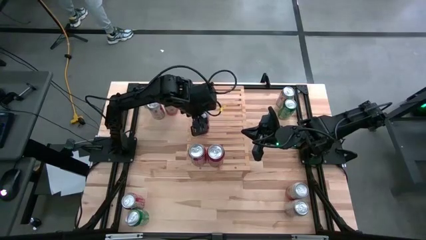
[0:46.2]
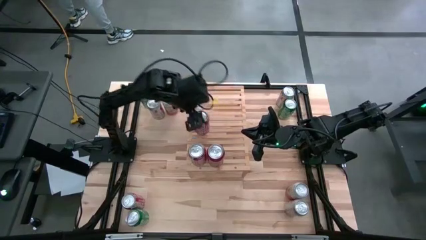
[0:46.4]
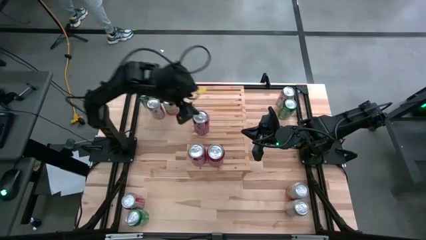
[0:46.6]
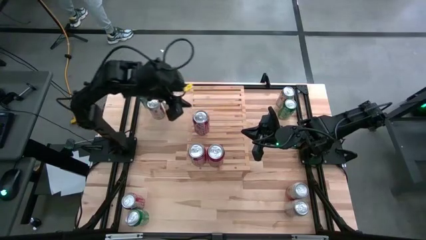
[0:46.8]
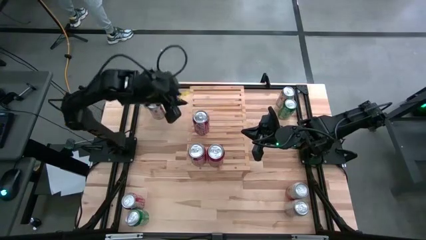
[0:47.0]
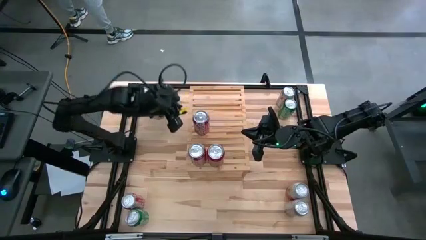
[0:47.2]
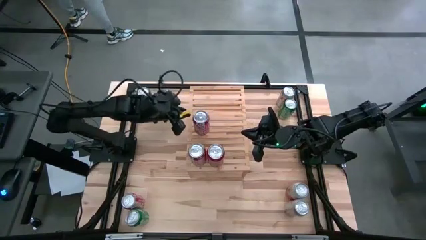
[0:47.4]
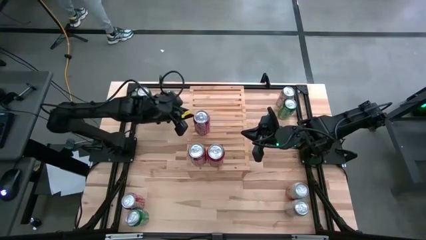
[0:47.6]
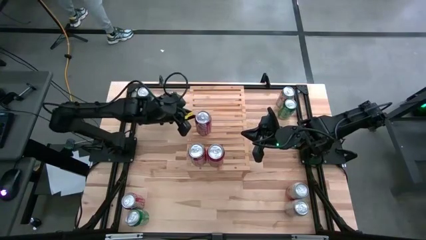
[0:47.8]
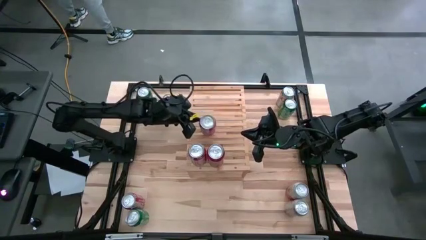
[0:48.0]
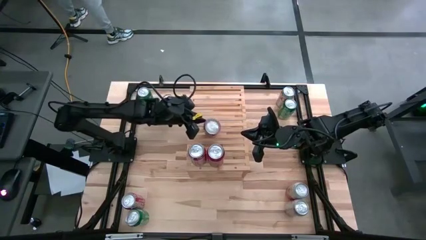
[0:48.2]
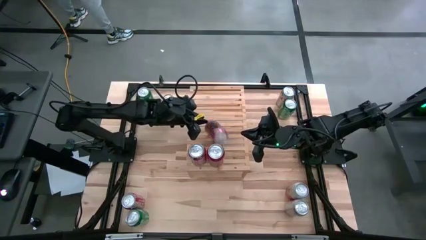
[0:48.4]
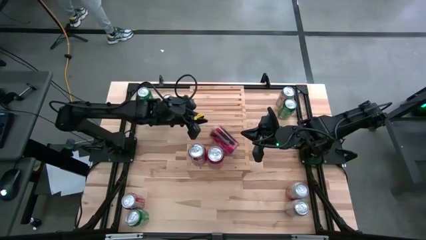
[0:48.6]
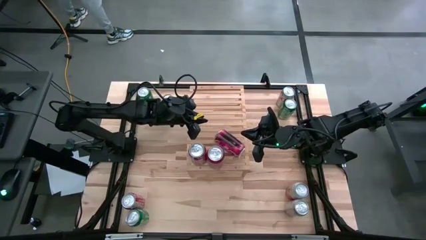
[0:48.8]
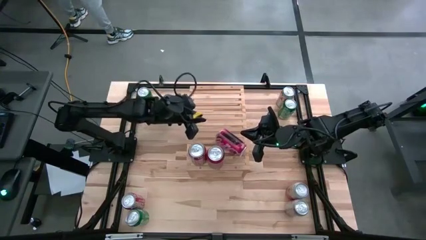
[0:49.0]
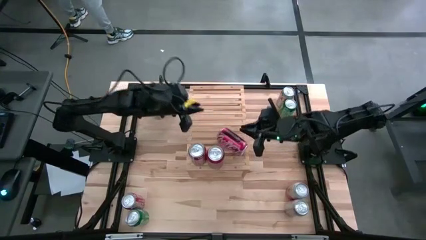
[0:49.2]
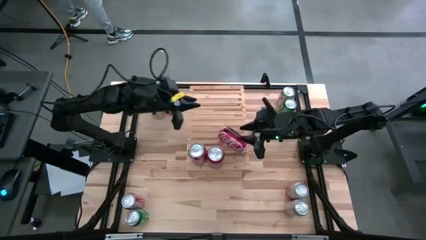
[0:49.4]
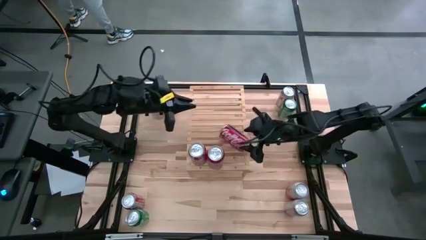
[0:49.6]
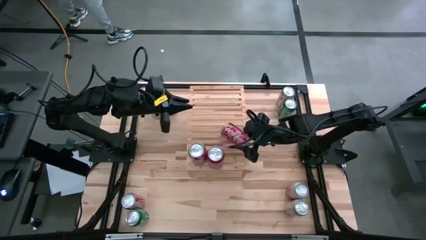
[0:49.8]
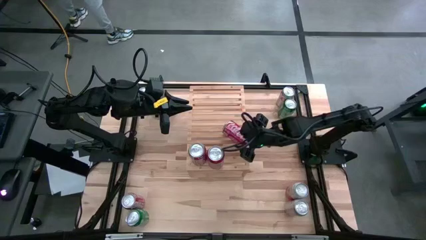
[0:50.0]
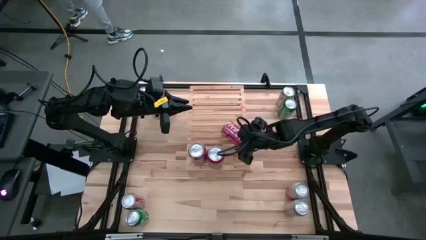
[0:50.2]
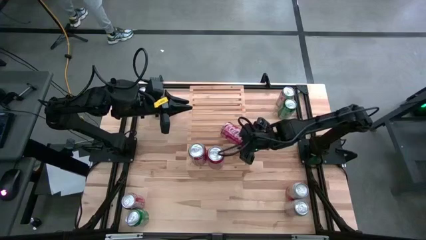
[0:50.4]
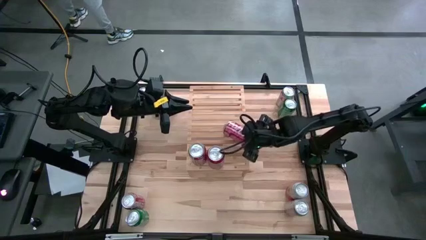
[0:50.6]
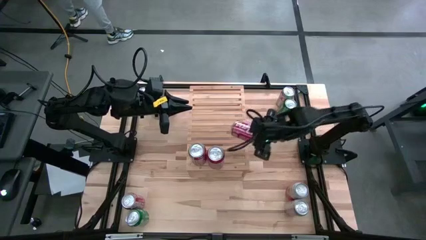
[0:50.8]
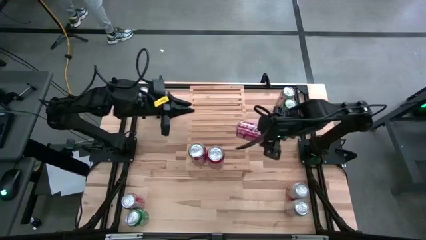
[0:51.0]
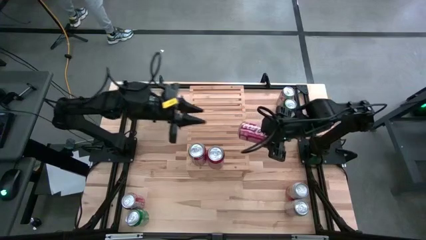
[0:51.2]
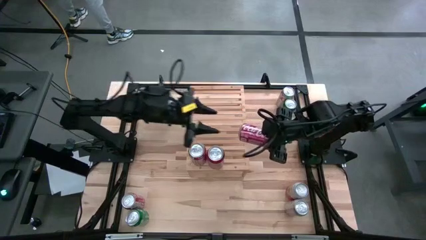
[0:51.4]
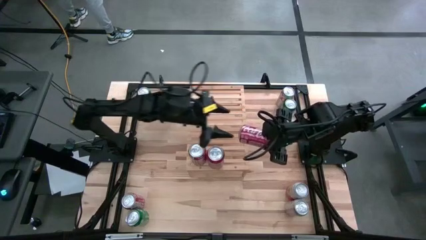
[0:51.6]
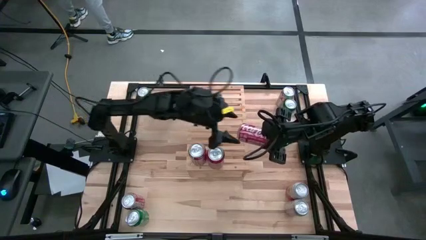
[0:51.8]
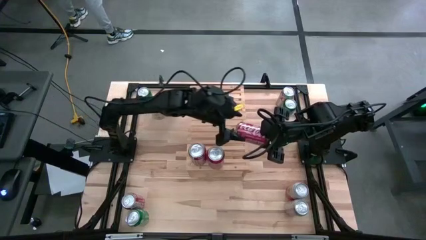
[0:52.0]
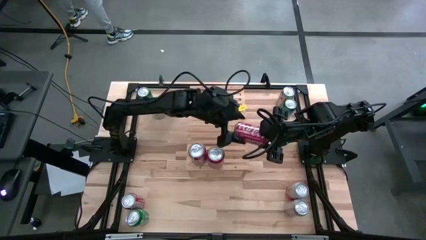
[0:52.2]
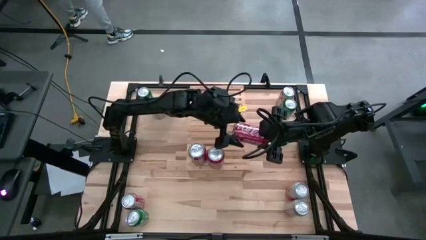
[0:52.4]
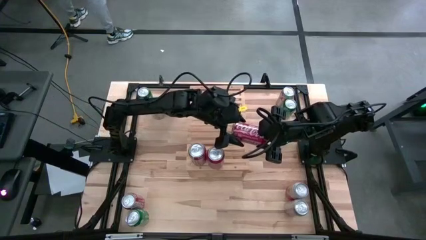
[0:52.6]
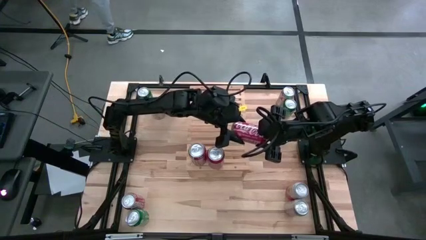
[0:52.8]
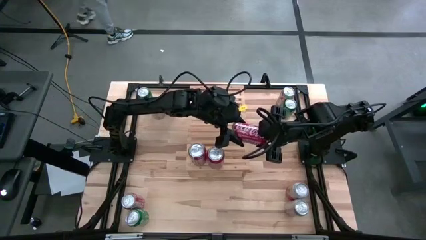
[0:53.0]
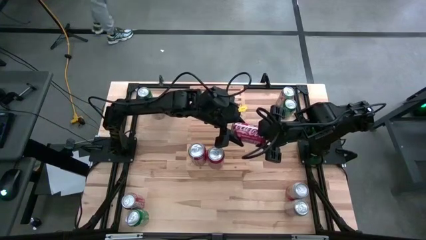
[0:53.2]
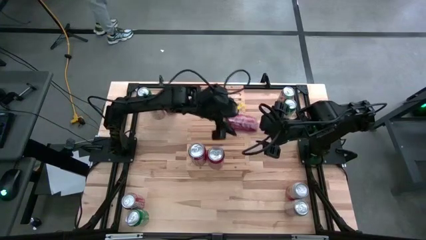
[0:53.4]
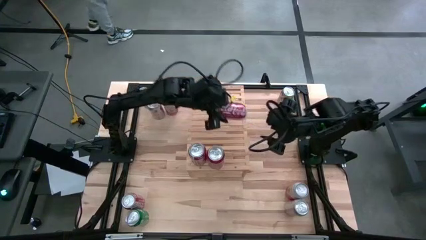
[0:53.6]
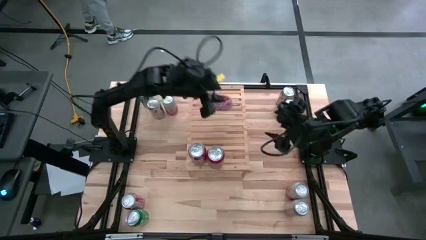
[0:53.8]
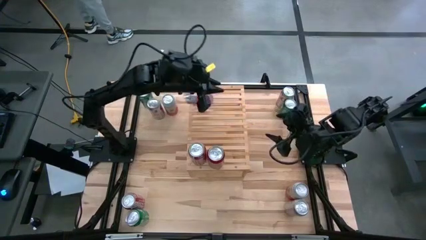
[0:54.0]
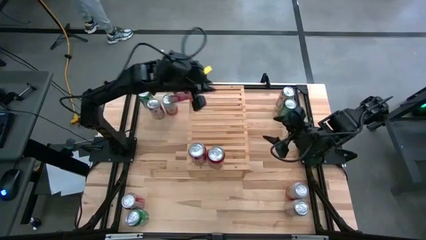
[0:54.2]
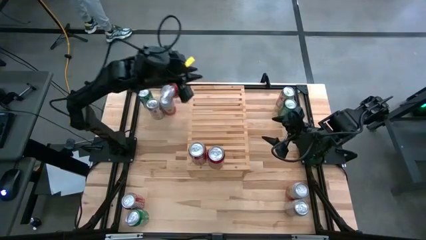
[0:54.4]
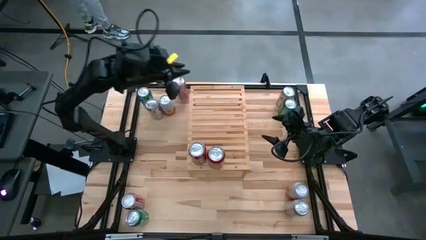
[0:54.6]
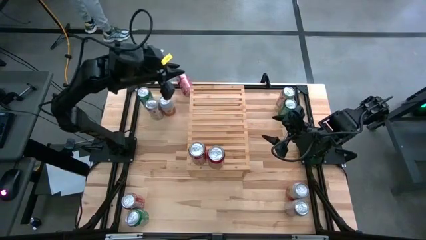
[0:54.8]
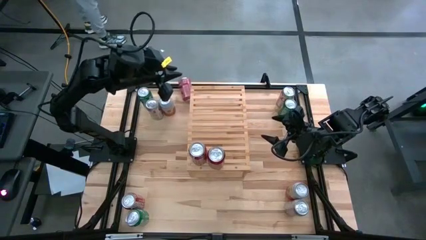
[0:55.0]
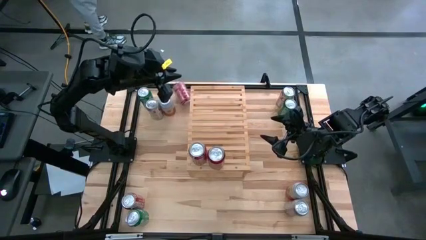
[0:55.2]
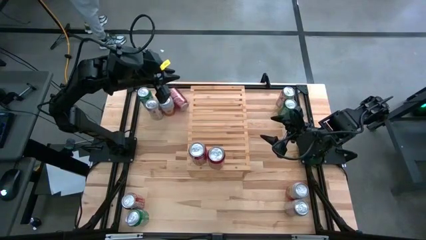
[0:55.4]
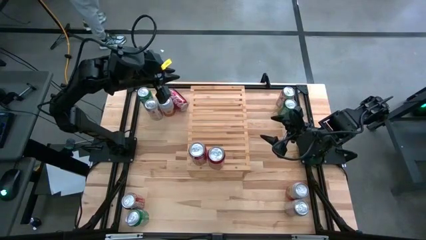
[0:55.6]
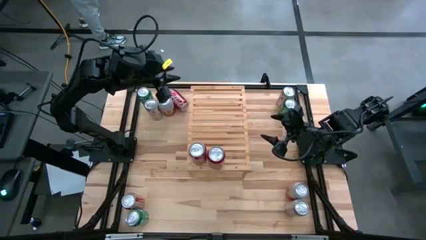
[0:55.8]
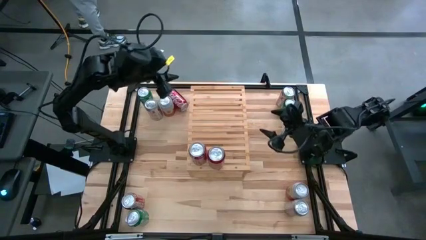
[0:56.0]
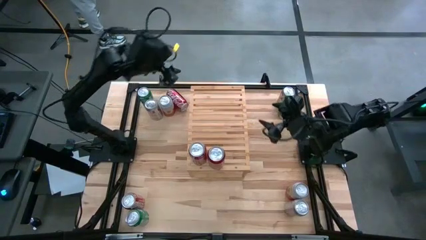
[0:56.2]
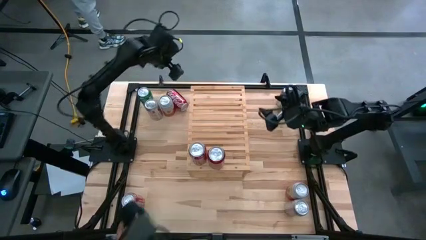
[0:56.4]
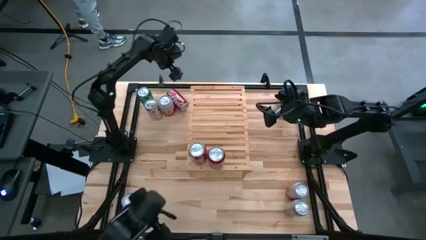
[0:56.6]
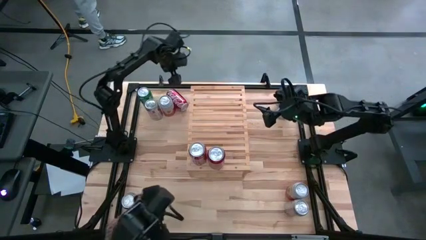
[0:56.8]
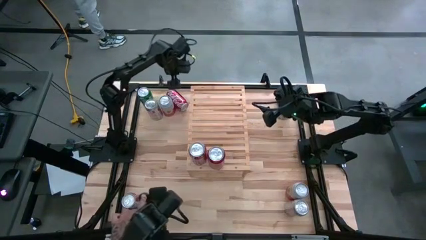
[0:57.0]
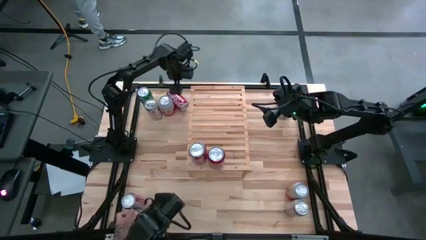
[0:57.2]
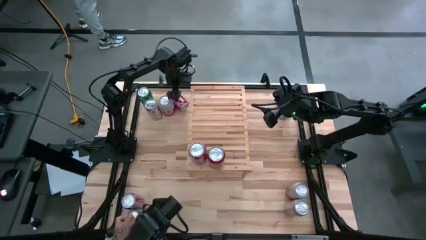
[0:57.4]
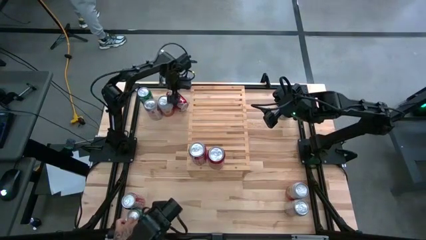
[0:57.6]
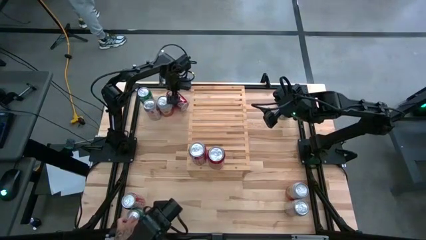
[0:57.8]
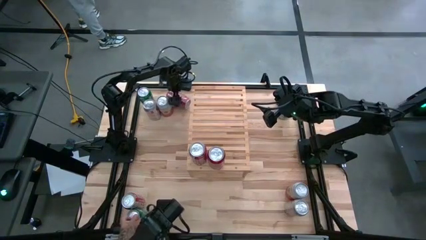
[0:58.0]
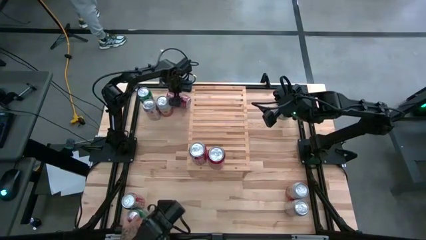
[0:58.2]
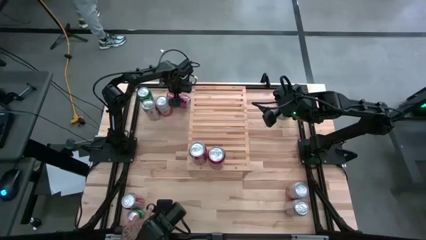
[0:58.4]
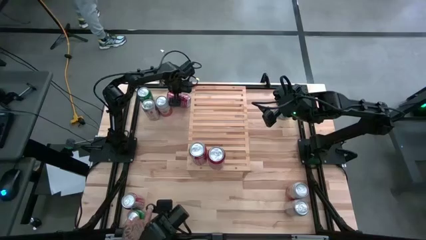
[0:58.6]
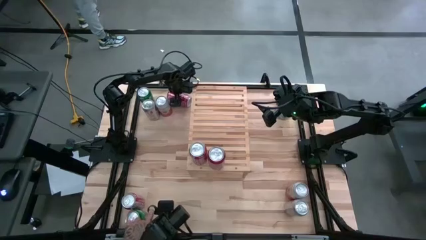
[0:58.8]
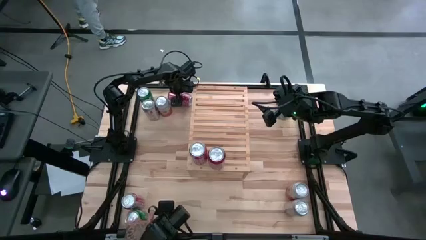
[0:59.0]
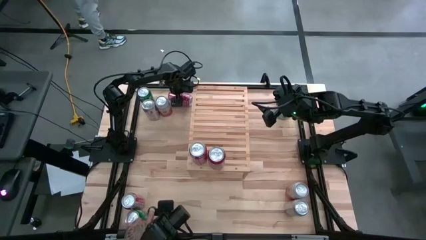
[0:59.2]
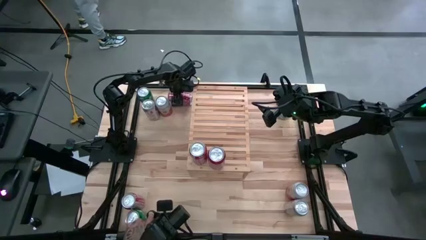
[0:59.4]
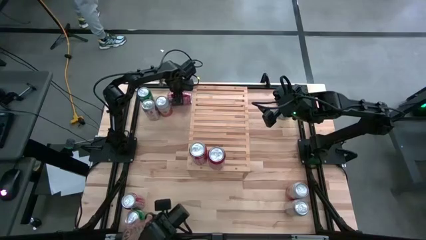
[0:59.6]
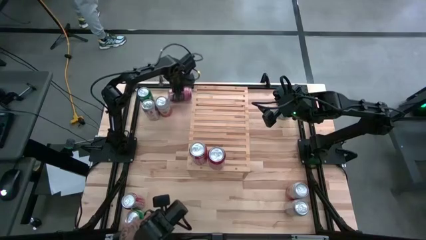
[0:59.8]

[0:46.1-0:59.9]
Task: Place canned beverage on shelf
Put the top red soda can on the shelf aligned with the other red soda cans
